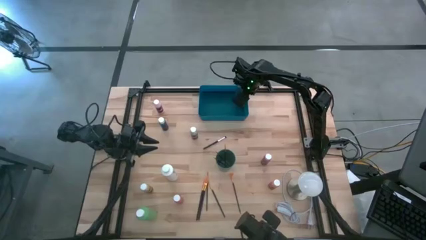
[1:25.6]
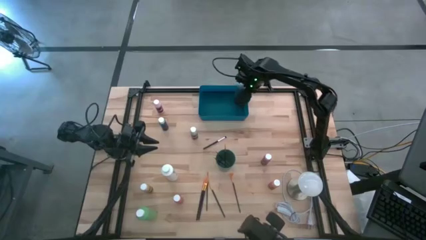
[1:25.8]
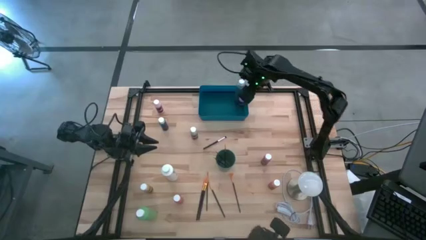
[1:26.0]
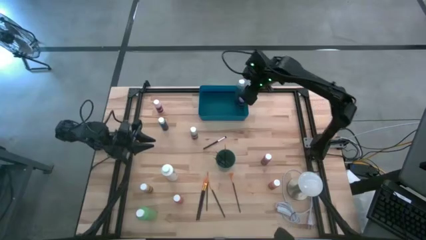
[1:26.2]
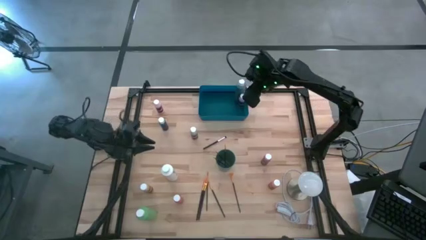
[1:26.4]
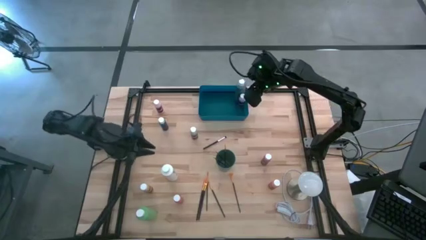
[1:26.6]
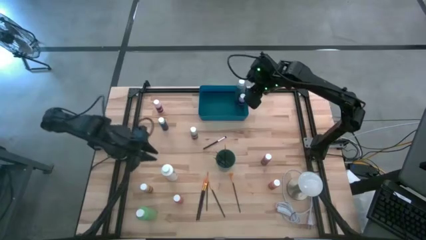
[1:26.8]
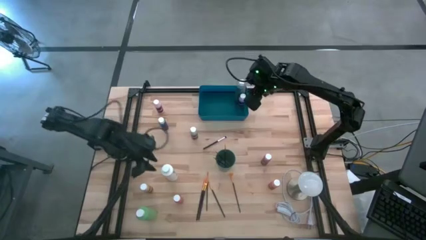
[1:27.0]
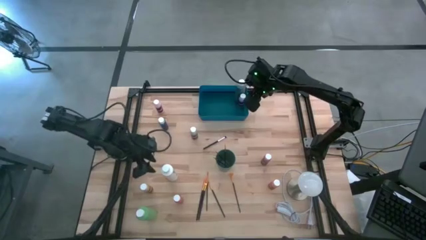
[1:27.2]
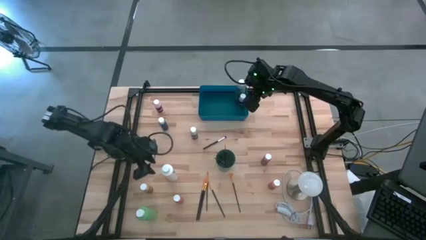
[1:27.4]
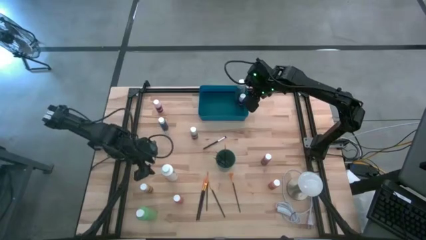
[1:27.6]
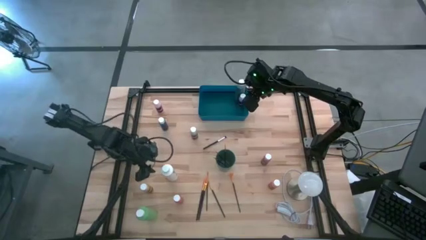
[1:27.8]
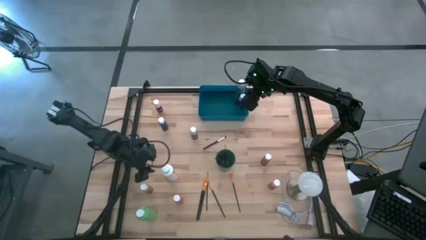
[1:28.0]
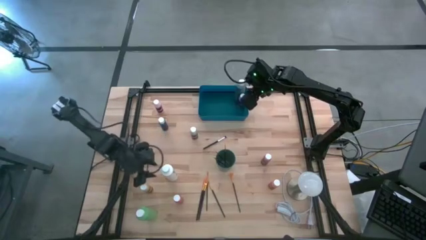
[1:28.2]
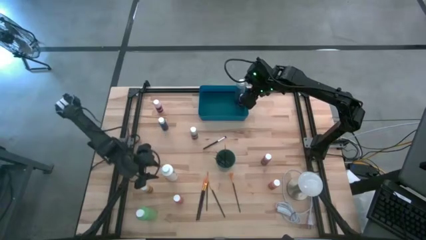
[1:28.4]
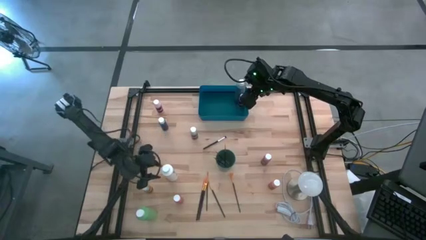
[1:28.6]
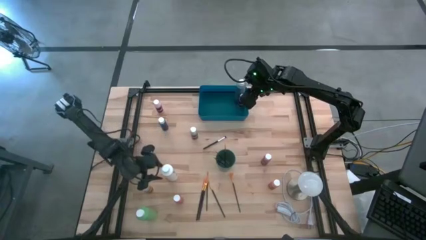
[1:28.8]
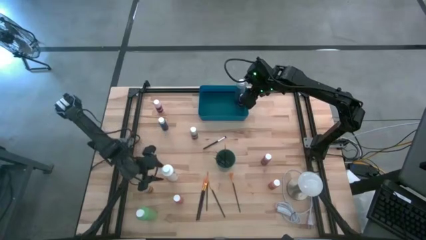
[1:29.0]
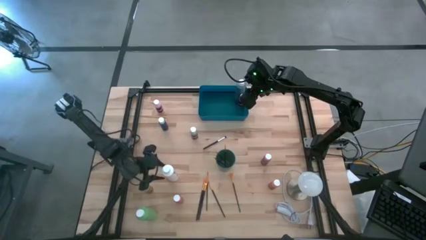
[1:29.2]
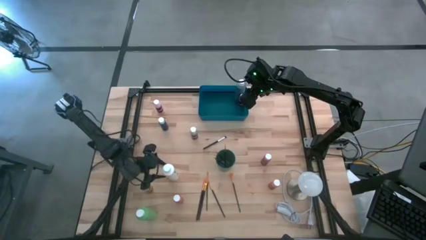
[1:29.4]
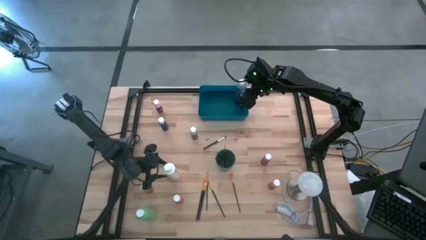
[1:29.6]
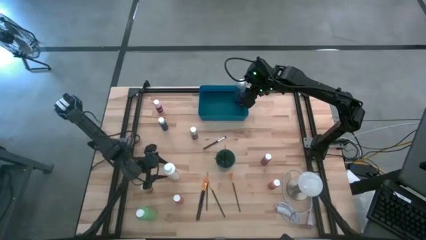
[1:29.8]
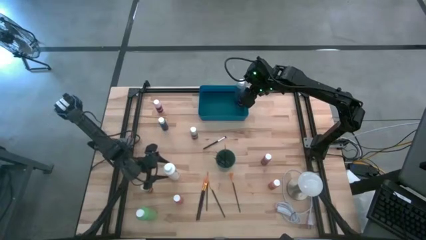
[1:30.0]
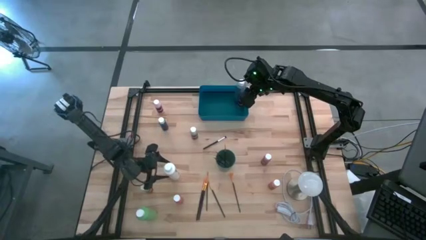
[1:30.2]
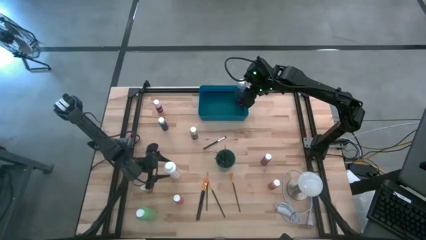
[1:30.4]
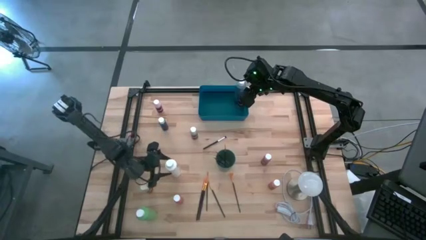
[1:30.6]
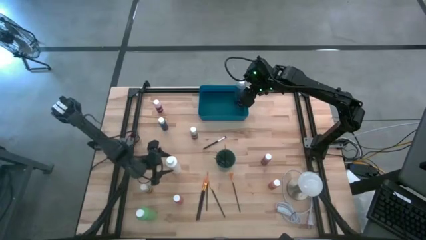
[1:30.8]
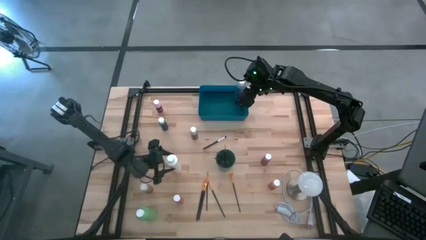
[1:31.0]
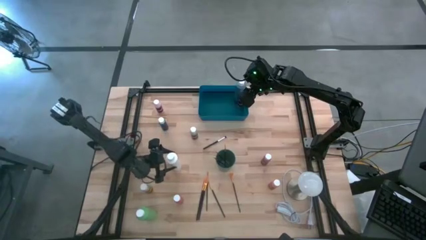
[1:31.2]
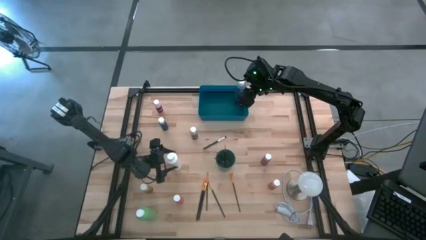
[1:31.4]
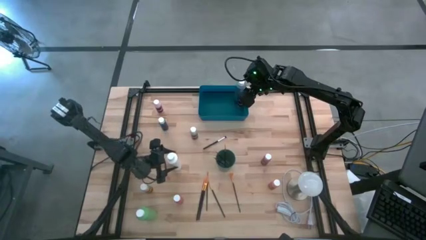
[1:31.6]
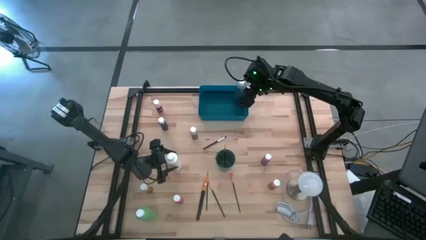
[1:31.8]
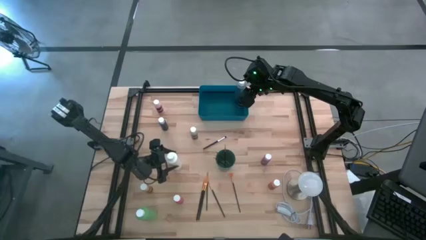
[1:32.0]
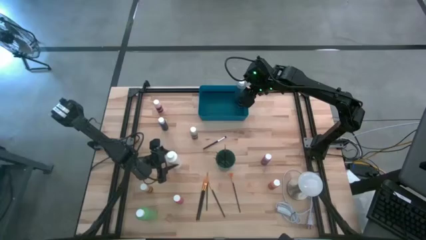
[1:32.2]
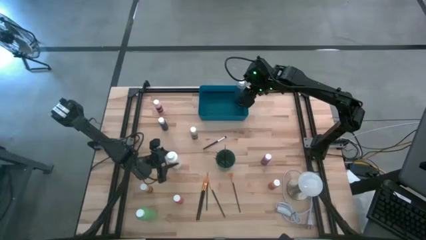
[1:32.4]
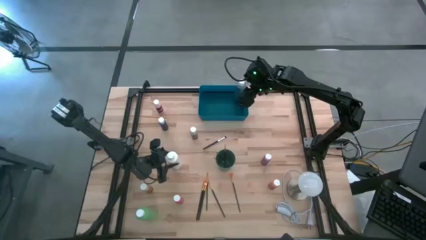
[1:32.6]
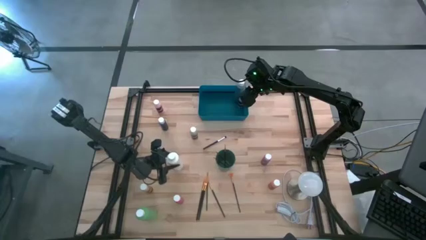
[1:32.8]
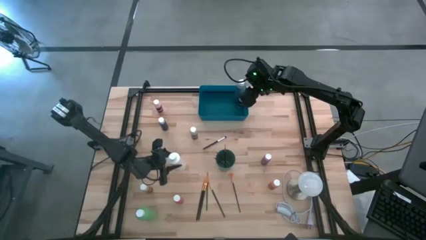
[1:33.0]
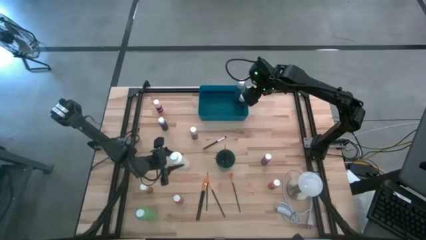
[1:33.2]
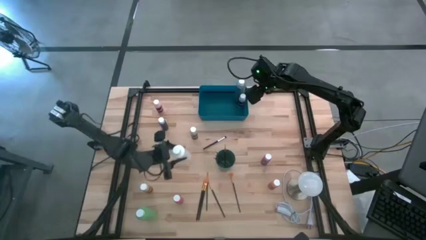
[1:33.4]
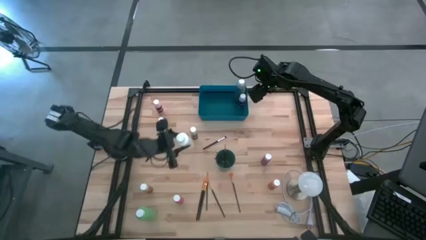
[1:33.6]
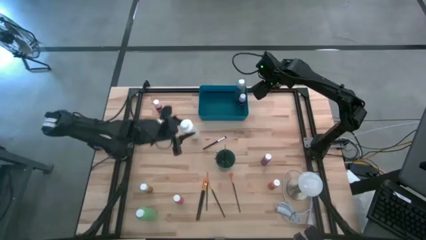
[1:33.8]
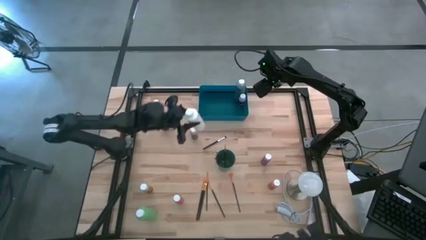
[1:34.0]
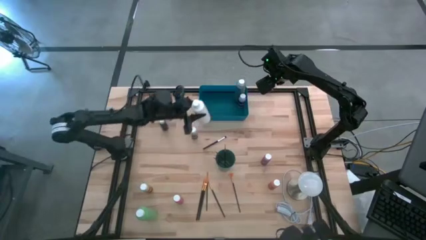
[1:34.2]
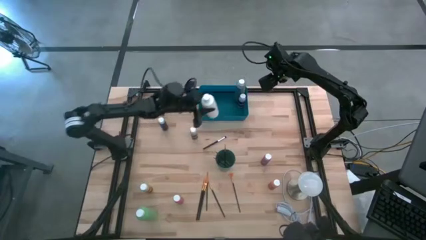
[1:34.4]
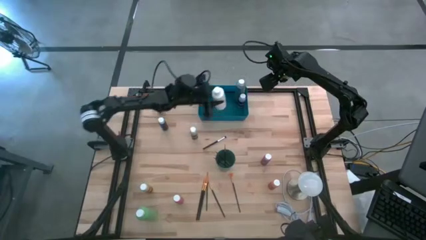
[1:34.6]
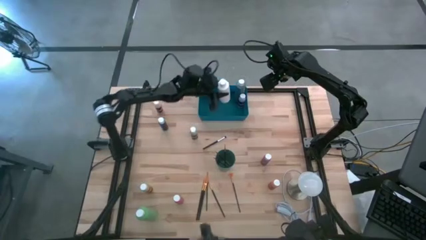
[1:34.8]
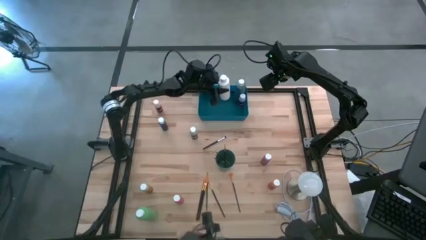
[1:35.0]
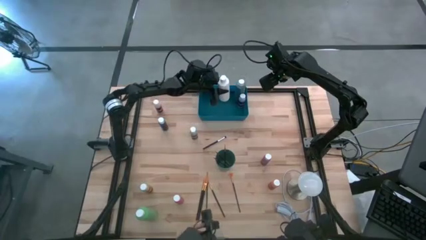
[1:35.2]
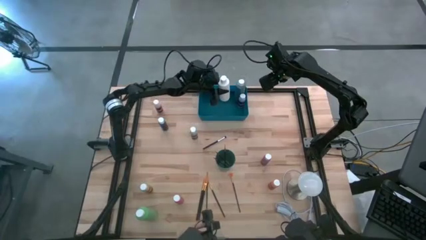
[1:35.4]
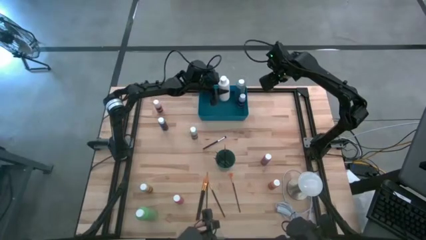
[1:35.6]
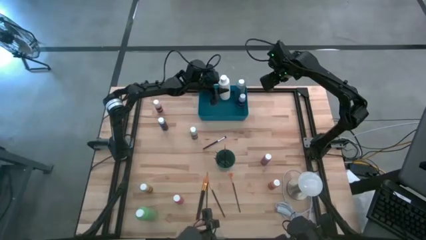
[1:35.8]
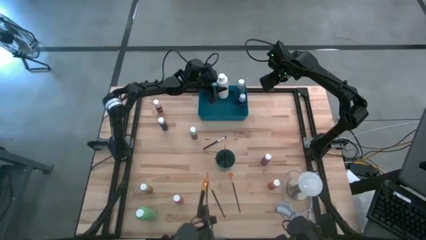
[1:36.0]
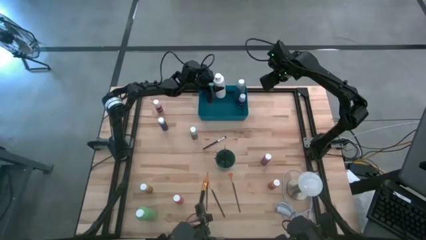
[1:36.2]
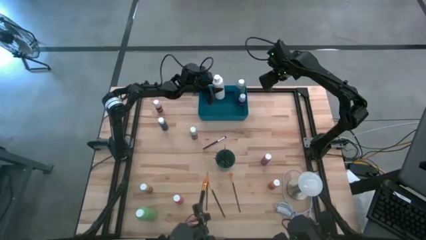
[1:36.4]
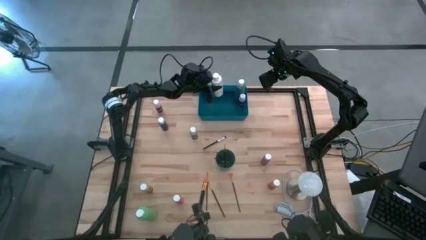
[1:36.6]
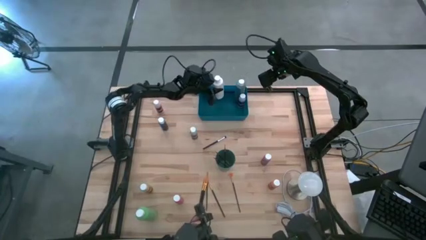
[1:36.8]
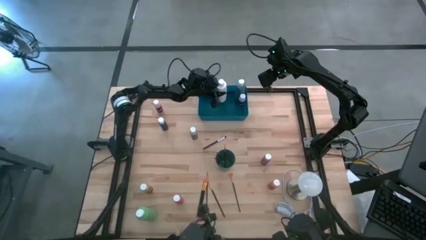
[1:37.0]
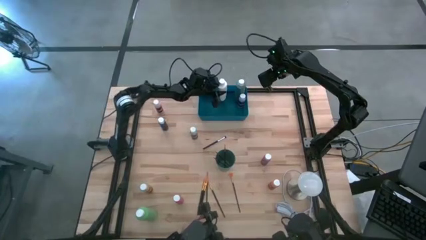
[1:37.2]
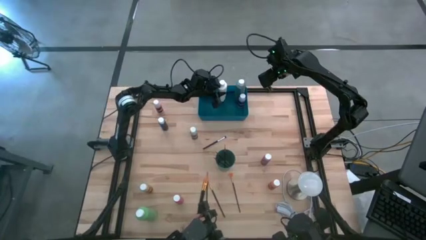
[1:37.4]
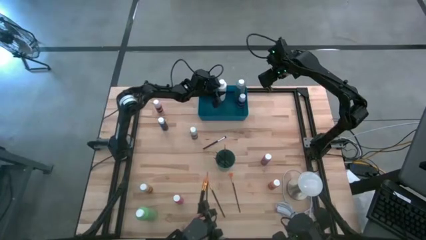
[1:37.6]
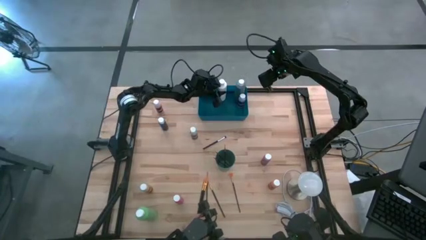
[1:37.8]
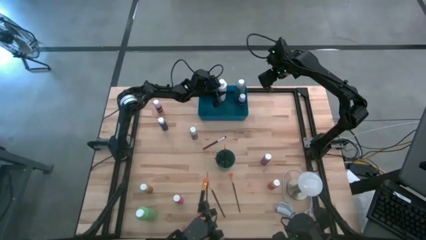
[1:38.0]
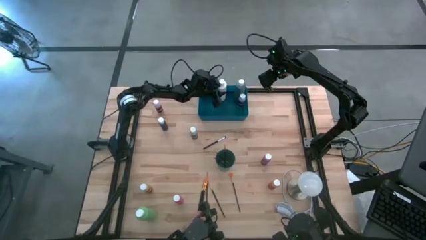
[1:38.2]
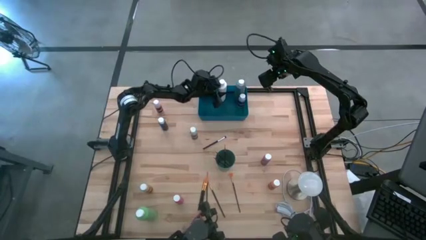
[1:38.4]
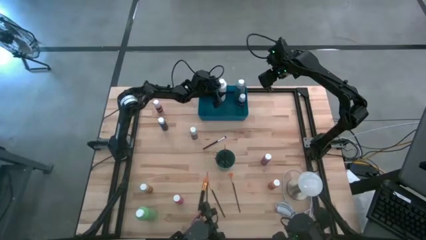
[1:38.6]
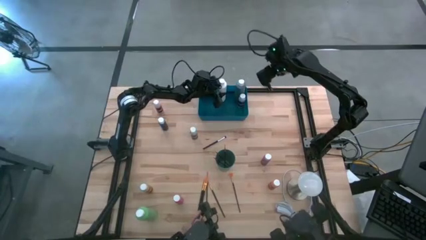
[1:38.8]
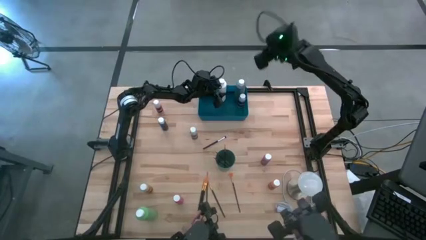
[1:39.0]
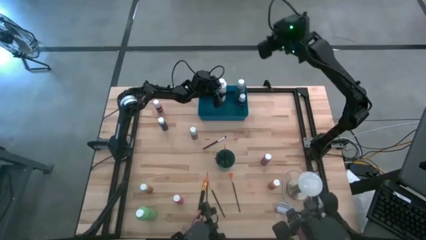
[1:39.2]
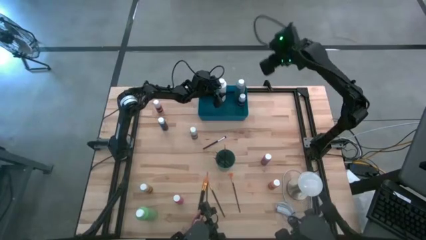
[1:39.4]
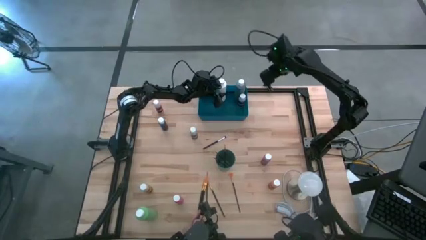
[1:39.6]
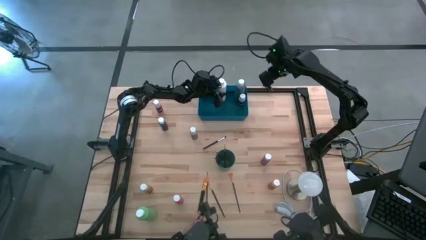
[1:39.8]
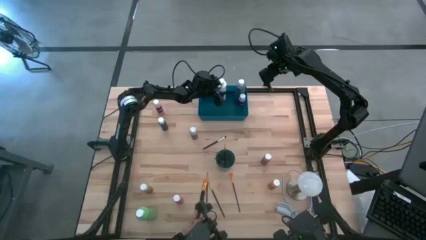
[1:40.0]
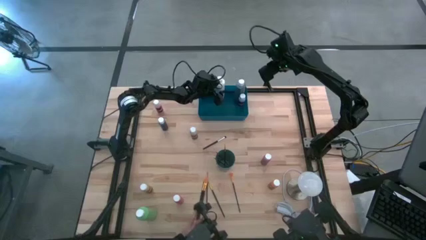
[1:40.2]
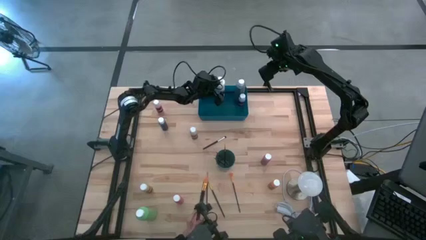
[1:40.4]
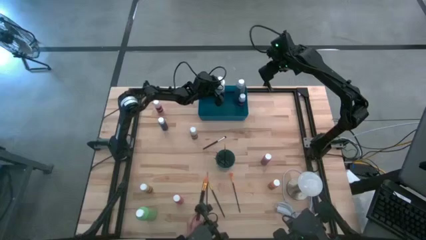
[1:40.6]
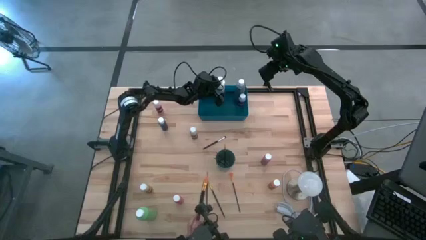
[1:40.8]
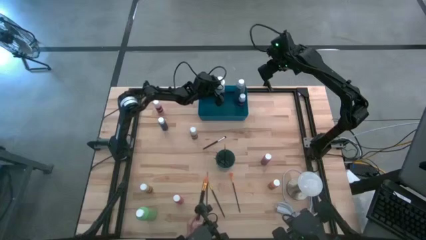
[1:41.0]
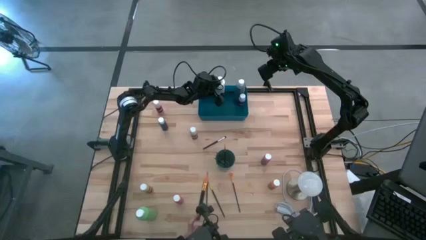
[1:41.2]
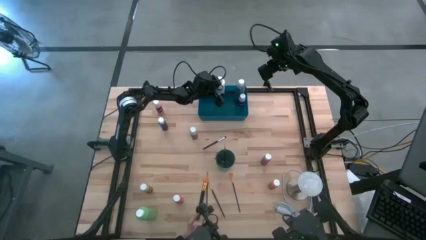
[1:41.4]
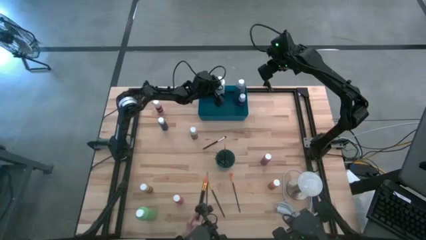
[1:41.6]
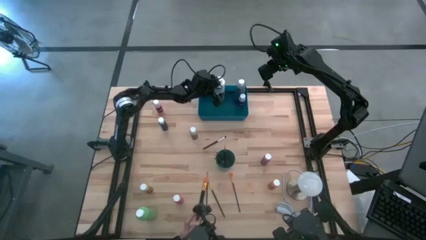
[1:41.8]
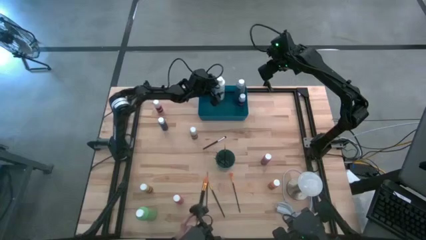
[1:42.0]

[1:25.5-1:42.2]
Task: Pick & Place Paint Supplies
Put the white paint bottle into the blue bin
